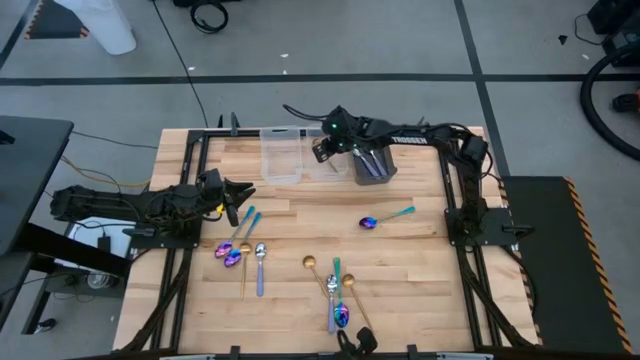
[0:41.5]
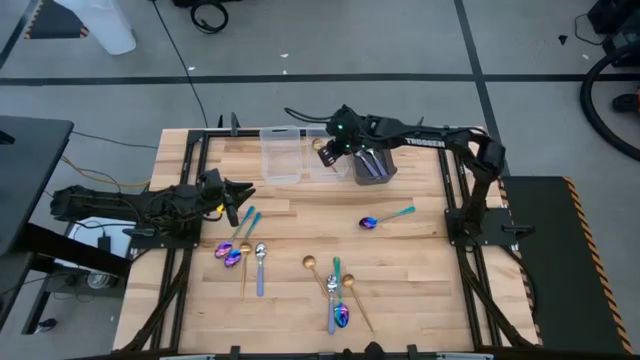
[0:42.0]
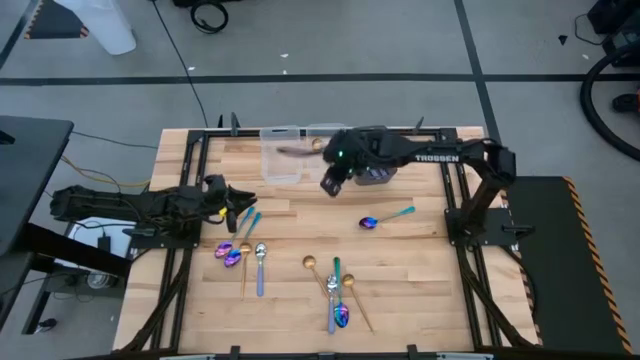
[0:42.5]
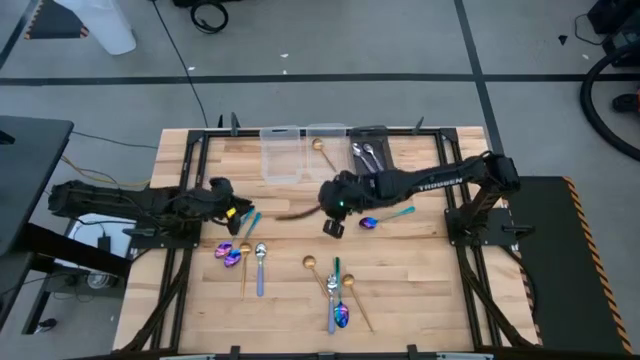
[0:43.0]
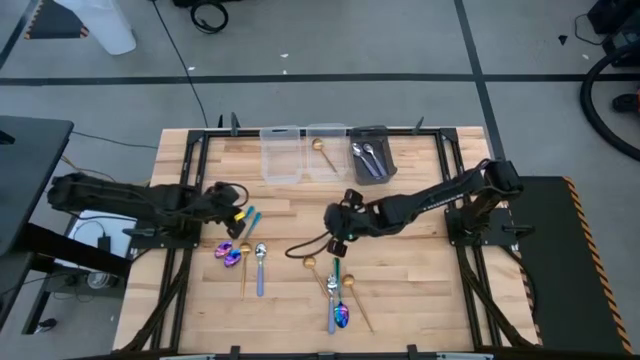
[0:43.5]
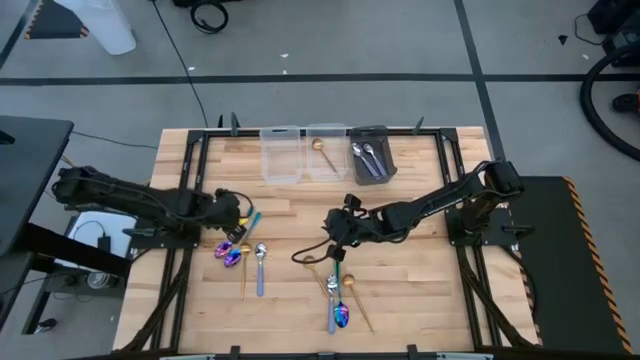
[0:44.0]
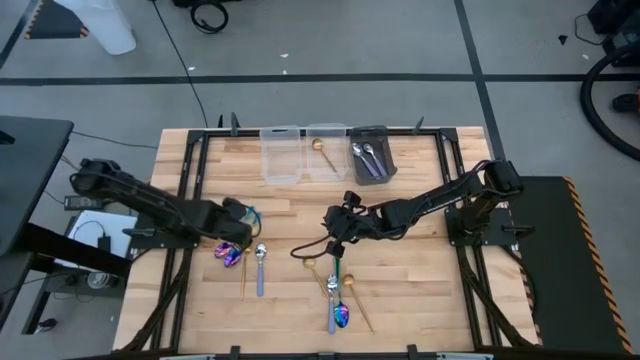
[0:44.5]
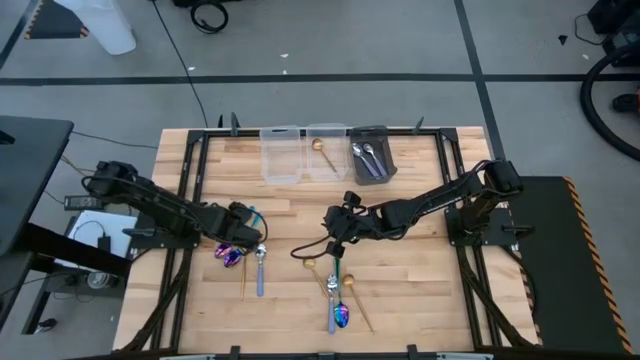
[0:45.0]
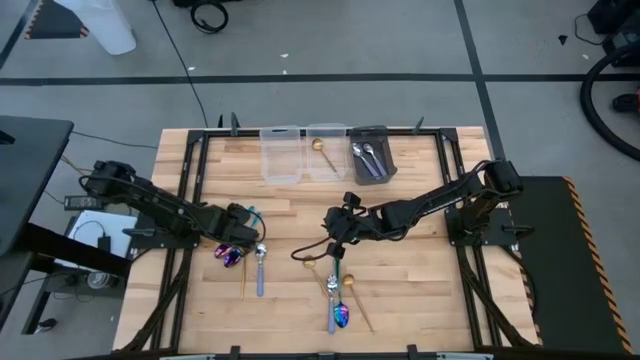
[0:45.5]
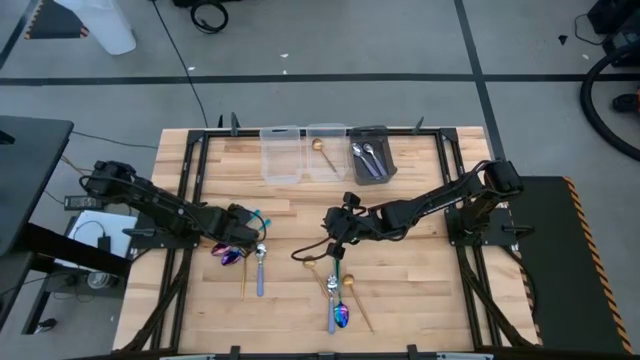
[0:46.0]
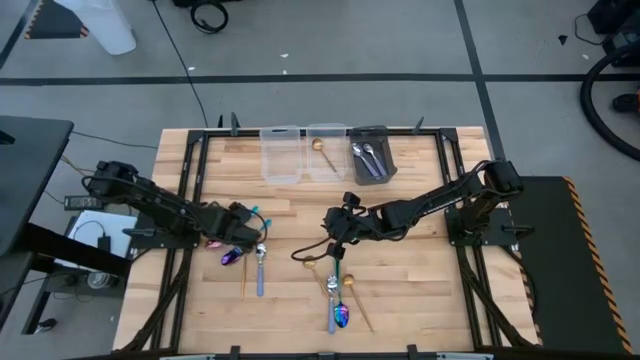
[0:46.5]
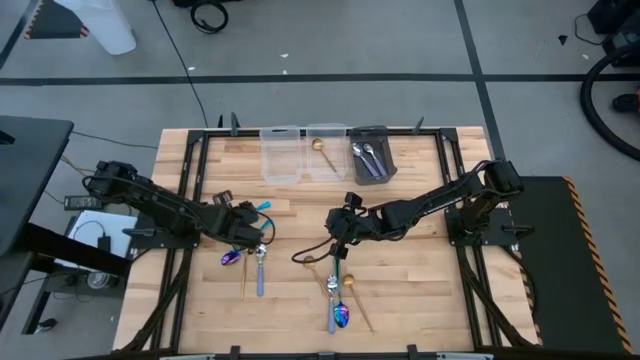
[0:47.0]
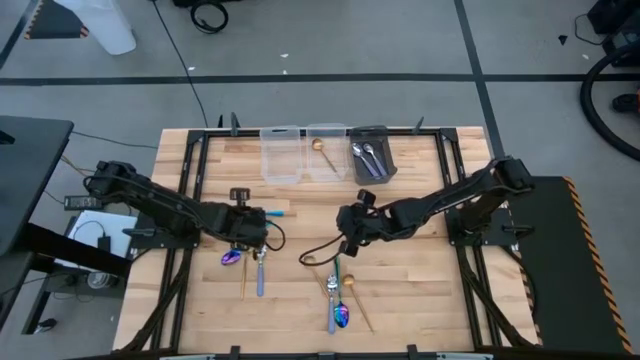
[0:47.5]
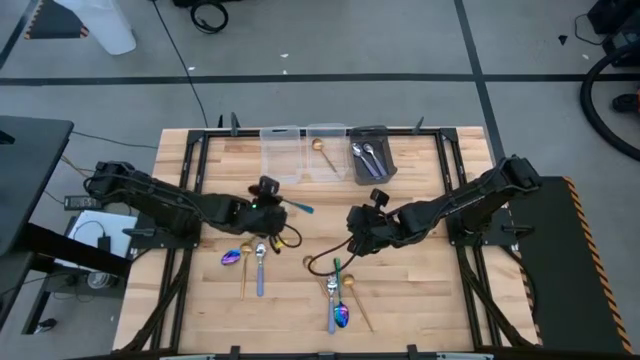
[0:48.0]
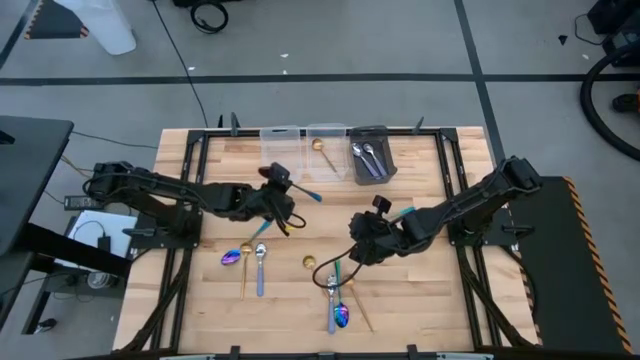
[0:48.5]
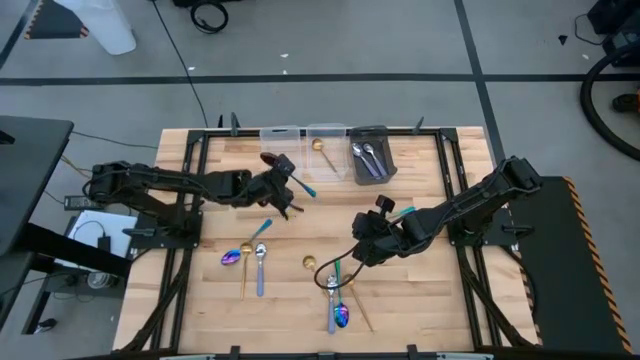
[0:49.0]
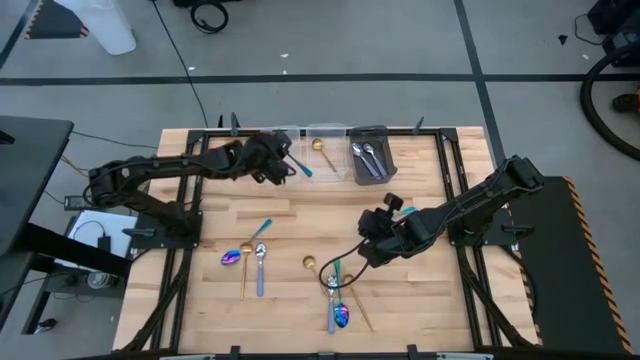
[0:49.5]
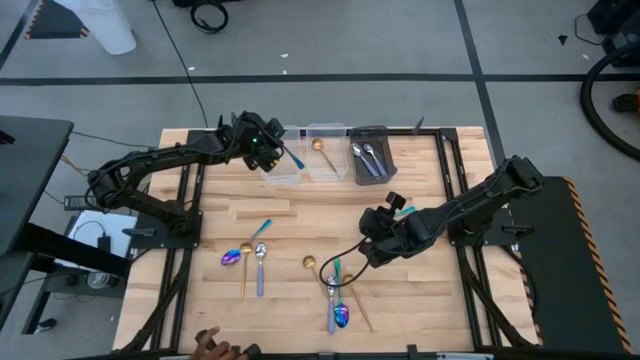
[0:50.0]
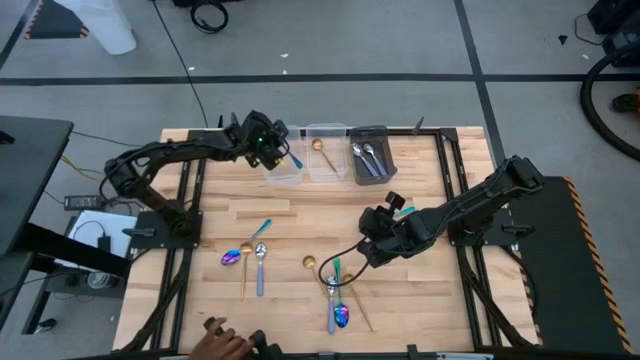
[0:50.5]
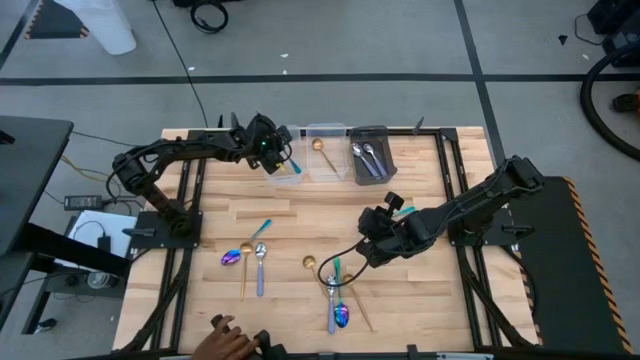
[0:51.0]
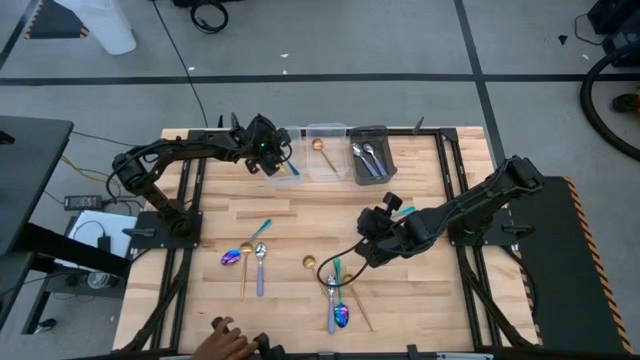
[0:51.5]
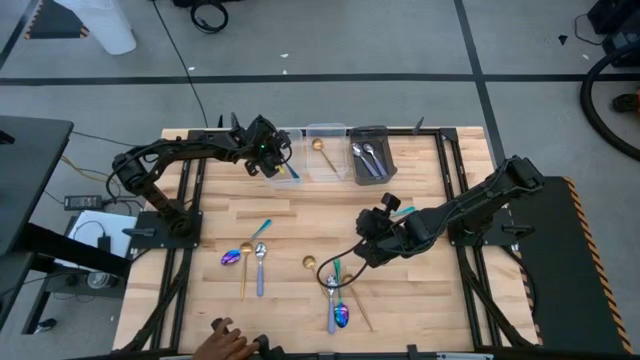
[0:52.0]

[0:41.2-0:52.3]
Task: Sort silverware by color (type)
Put the blue spoon into the left transparent bin

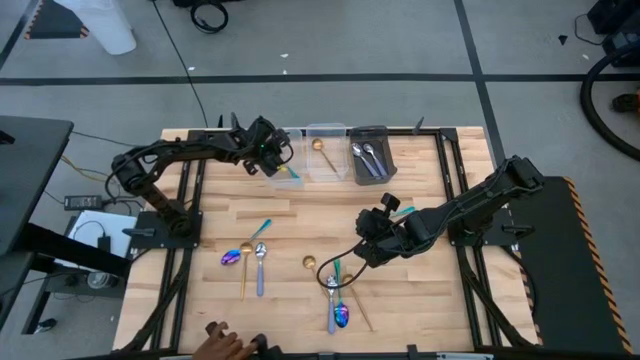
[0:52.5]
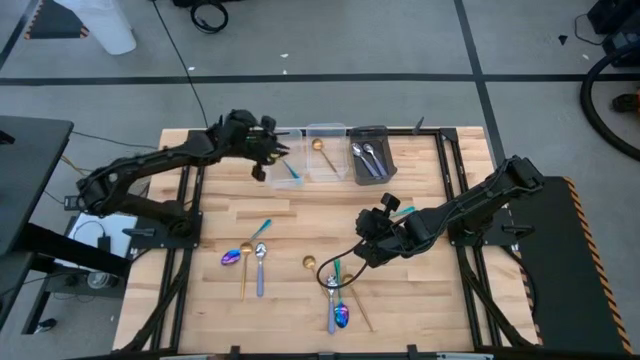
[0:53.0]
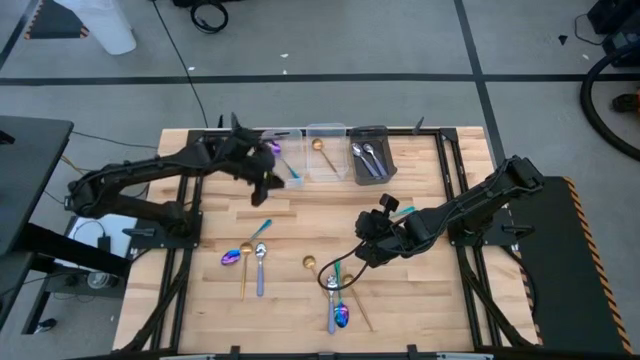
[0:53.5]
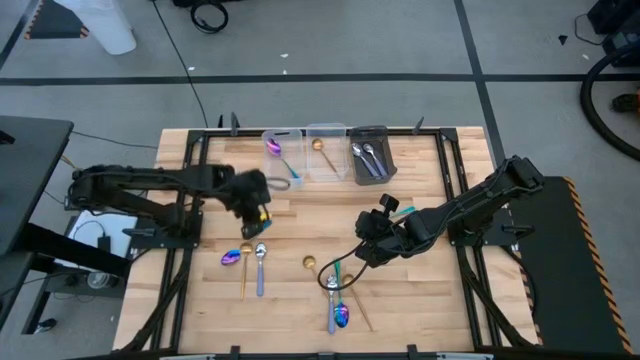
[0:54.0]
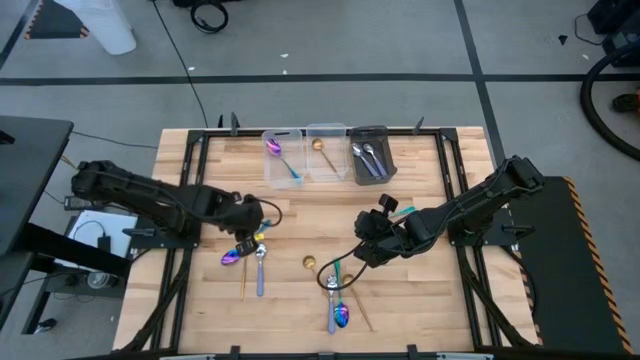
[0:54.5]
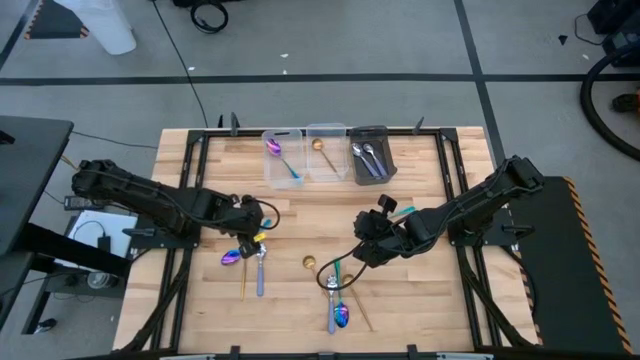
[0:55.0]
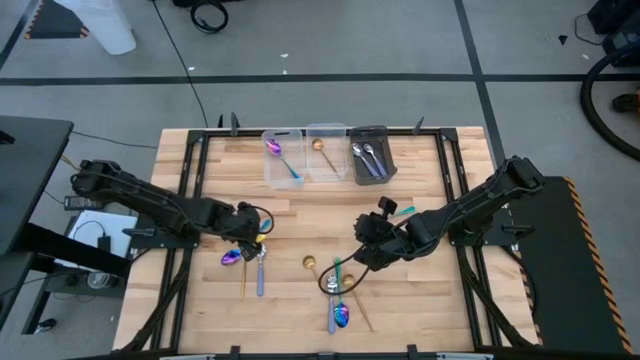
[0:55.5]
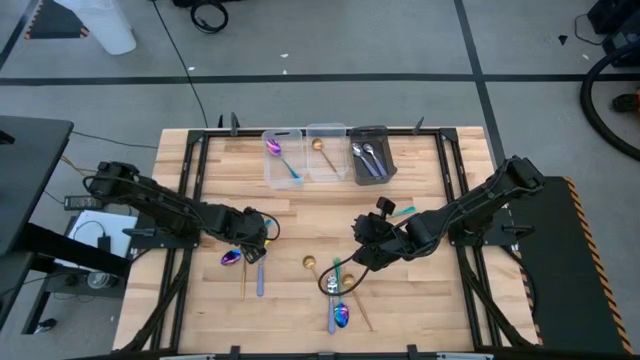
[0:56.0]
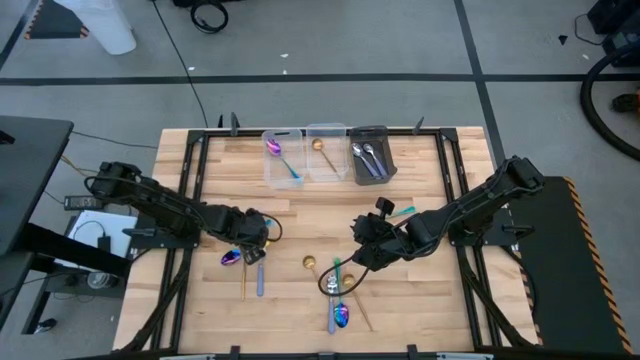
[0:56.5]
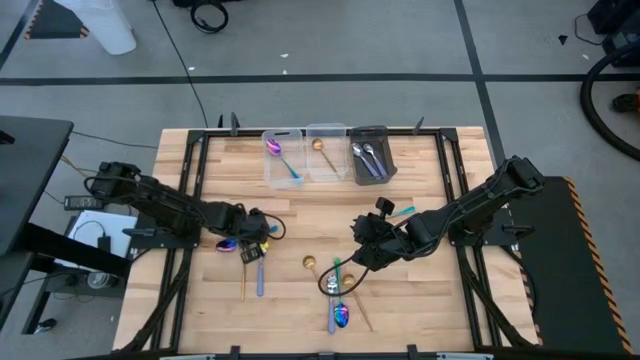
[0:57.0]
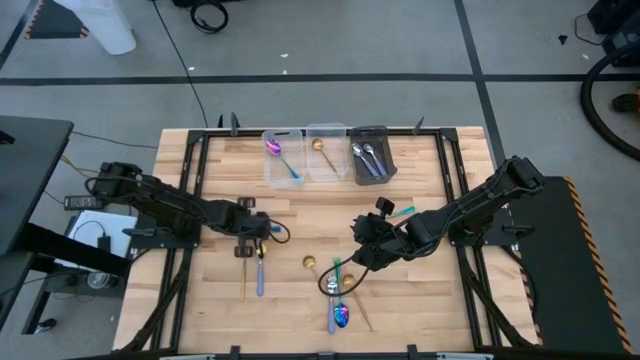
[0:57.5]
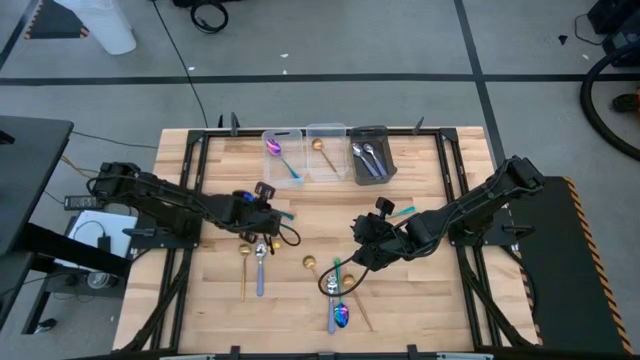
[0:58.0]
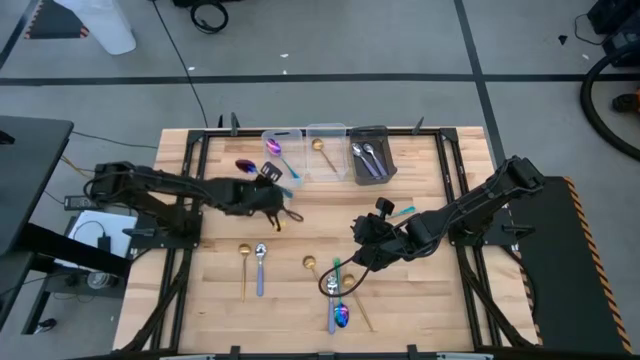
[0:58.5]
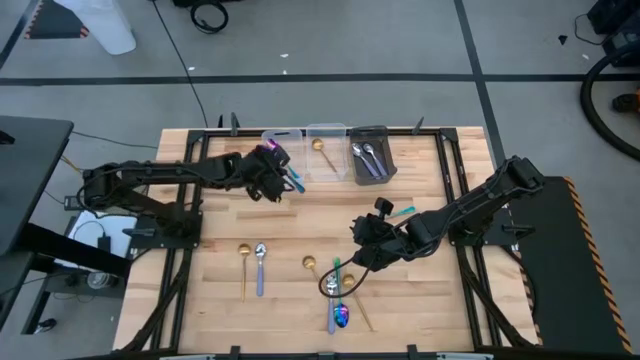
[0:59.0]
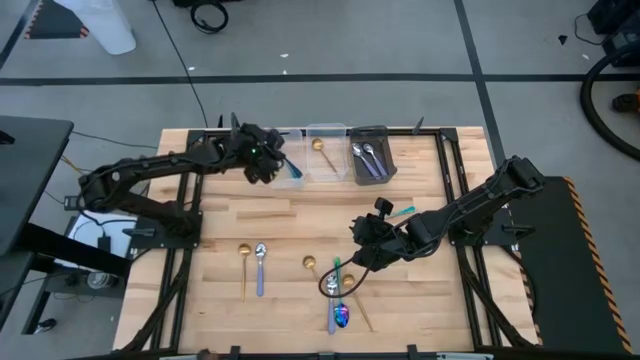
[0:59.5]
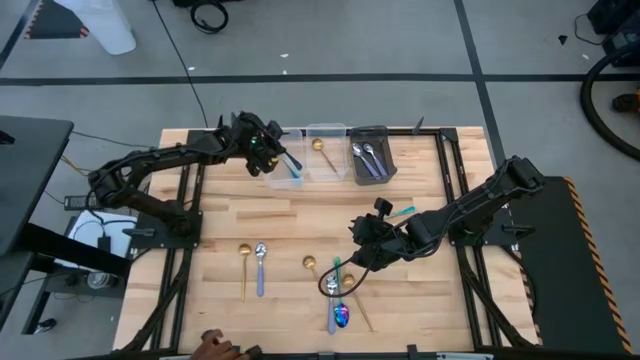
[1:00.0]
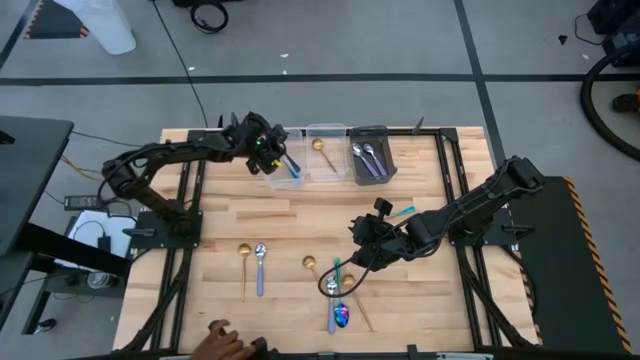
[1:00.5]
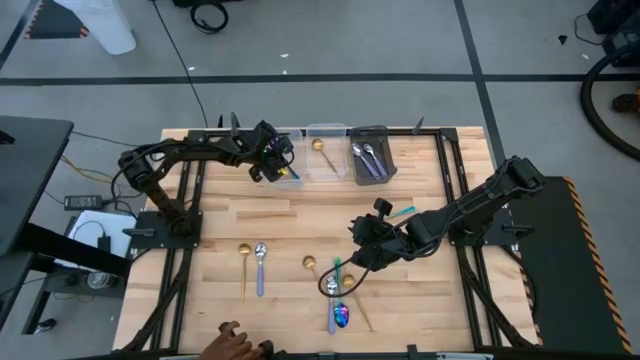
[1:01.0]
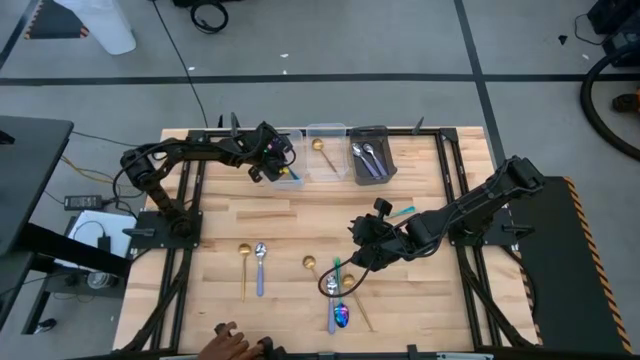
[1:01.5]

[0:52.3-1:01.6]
Put the blue spoon into the left transparent bin

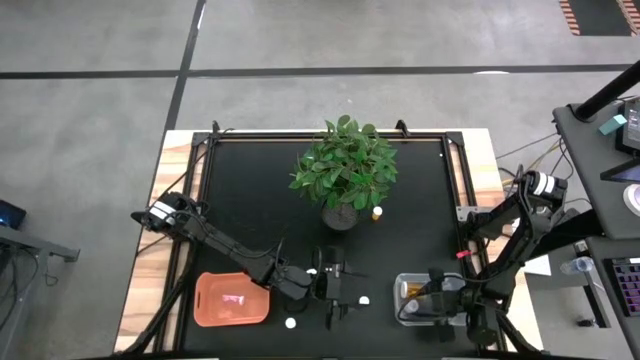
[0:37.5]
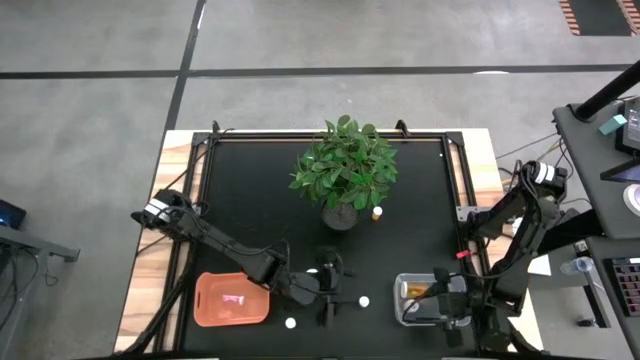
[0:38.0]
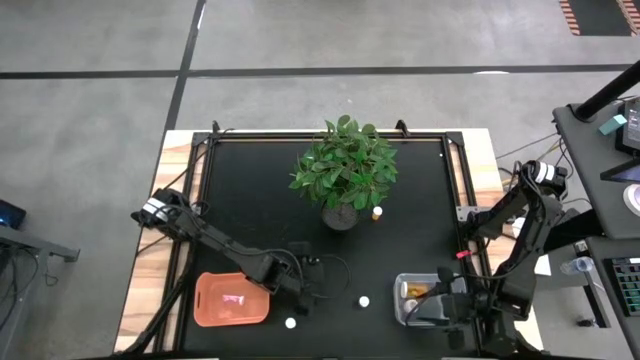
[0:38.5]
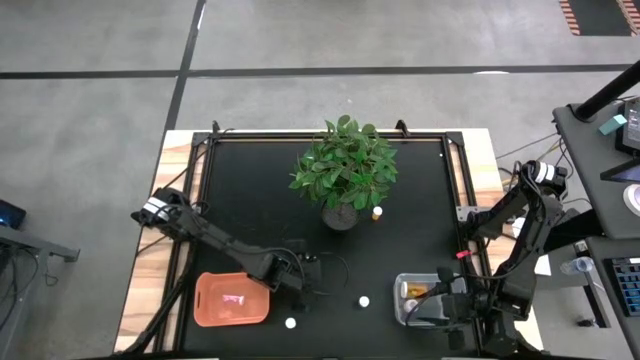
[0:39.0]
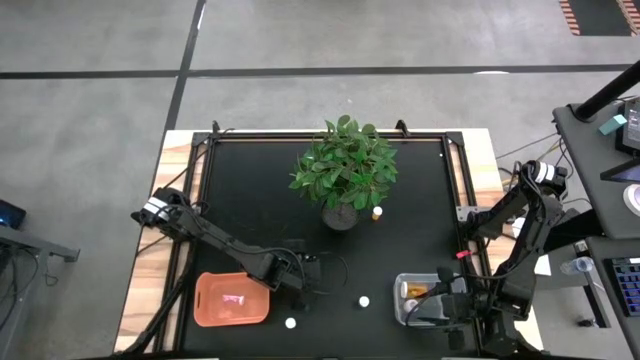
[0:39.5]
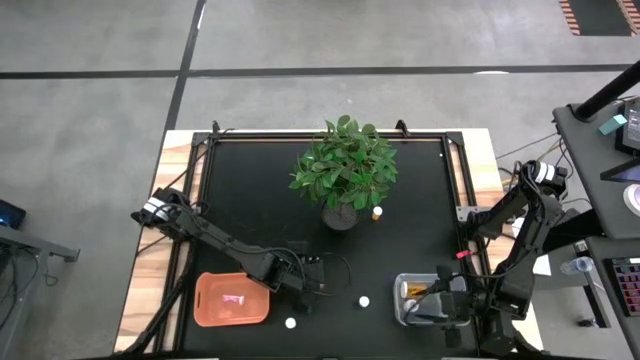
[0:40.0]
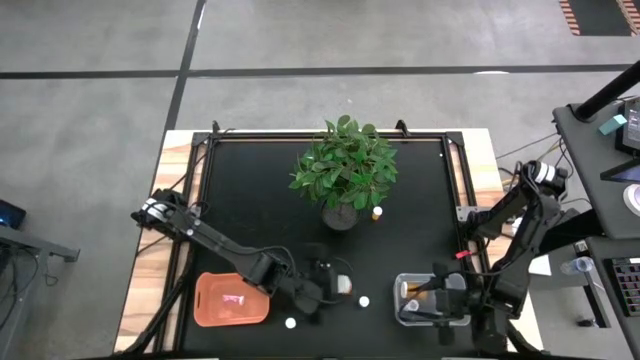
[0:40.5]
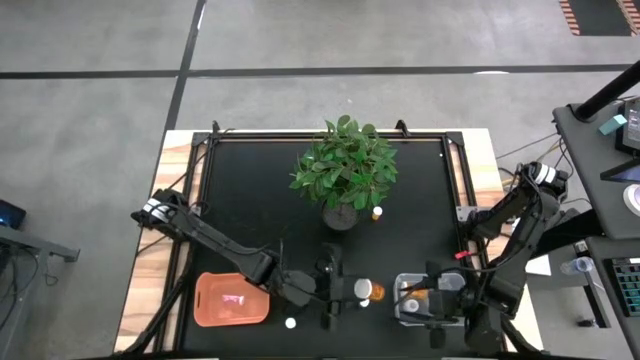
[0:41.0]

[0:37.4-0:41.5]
Task: Pick and place medicine bottles into bin by pill shape (circle, oval)
Put the orange capsule bottle into the transparent bin
